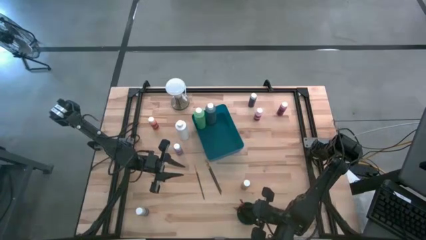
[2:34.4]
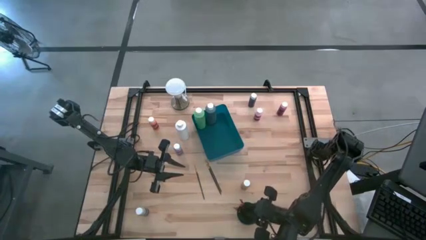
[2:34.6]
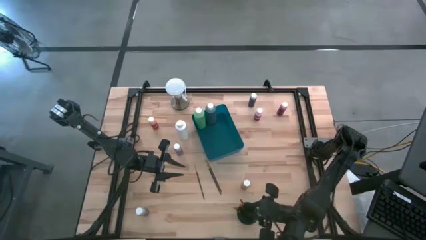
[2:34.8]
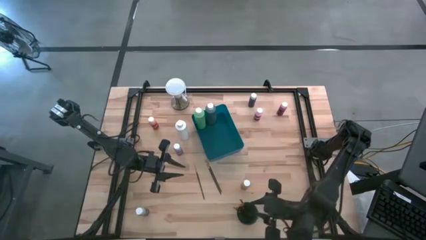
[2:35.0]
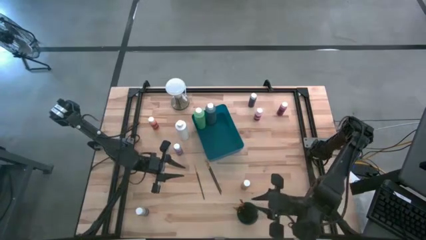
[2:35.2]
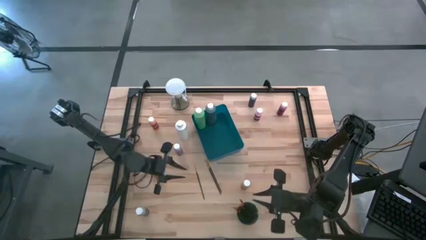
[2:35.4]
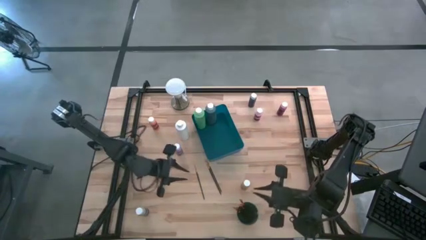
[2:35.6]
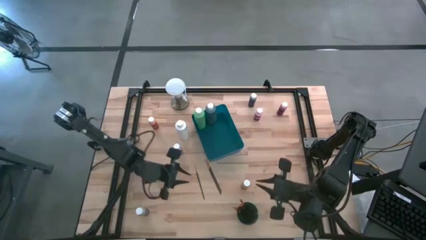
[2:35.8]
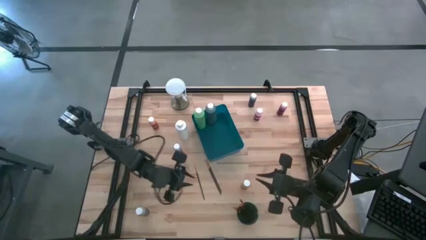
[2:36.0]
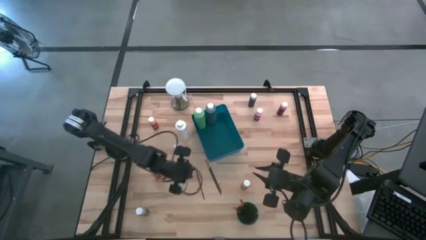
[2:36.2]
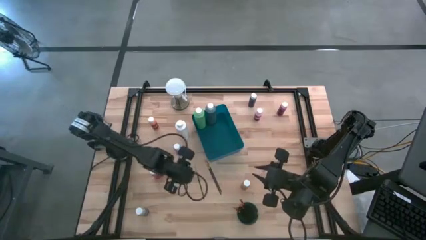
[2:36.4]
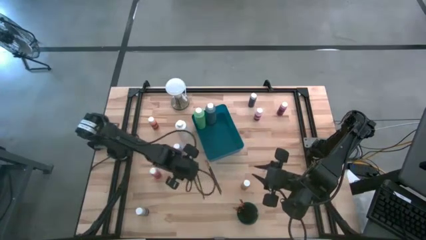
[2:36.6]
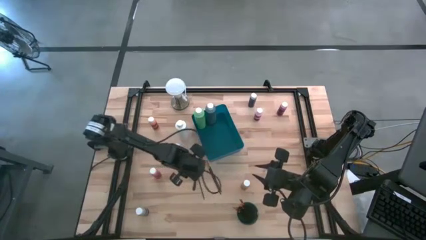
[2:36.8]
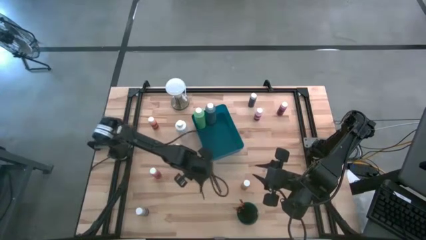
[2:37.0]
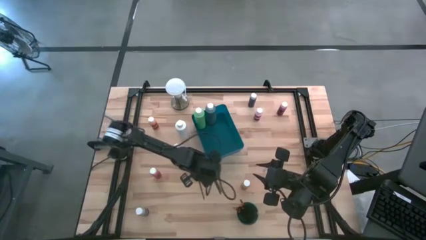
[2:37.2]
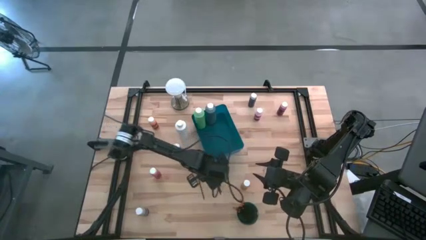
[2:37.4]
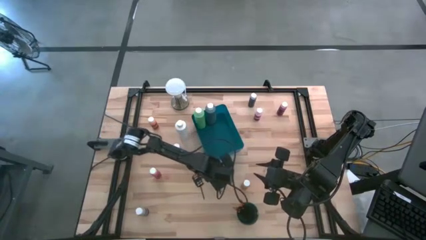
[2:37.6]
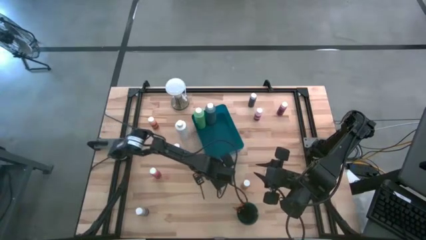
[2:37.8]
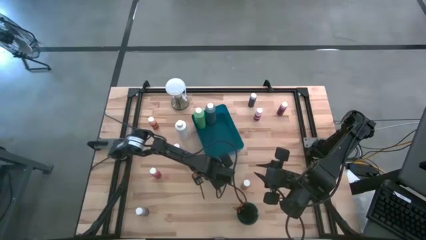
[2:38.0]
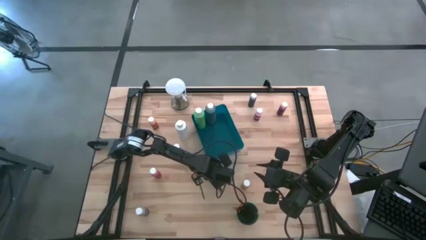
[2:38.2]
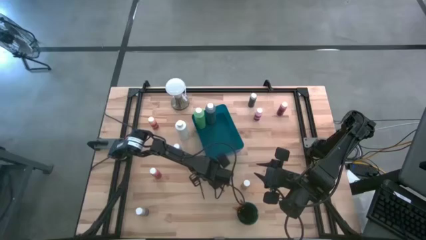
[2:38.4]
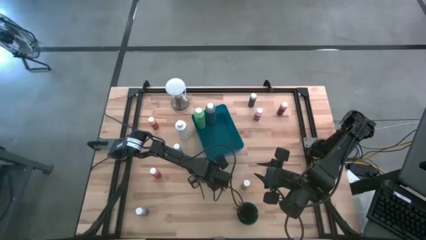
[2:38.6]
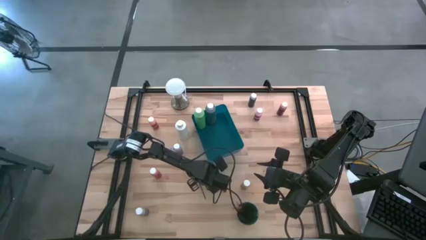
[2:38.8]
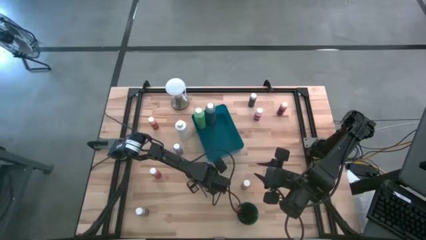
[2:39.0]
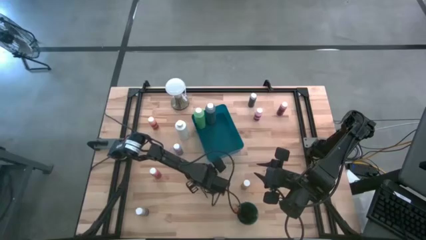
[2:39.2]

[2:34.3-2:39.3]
Task: Pick & Place Paint Supplies
Adjust the gold paintbrush

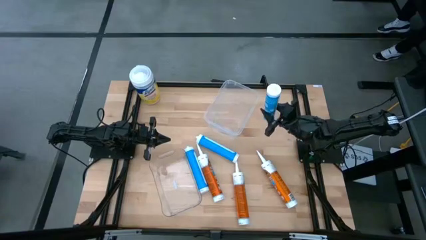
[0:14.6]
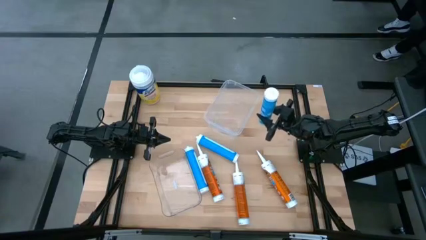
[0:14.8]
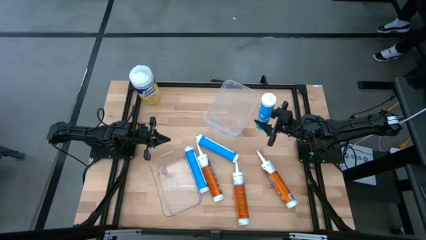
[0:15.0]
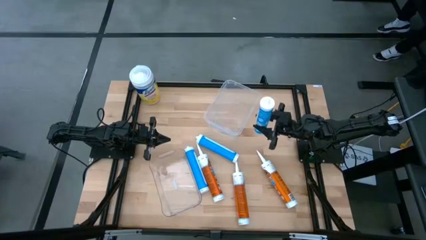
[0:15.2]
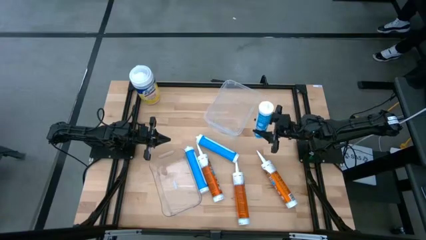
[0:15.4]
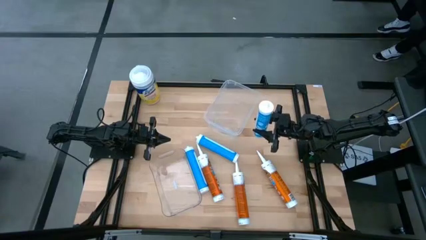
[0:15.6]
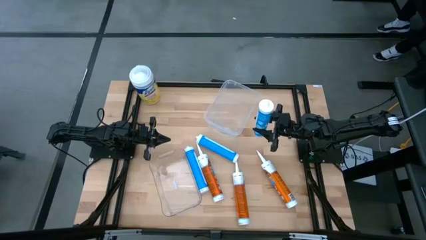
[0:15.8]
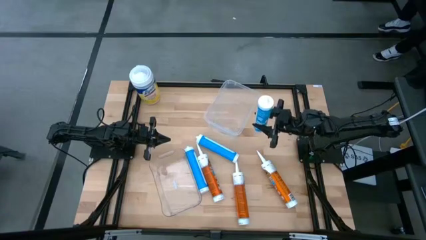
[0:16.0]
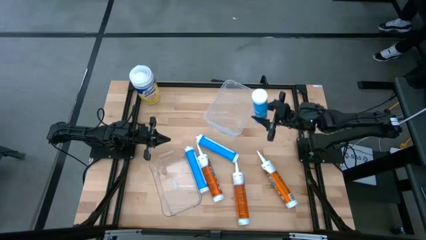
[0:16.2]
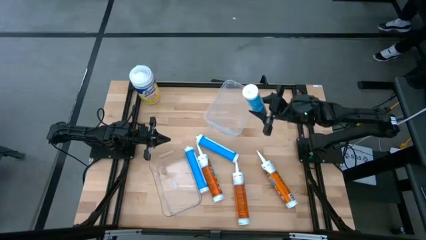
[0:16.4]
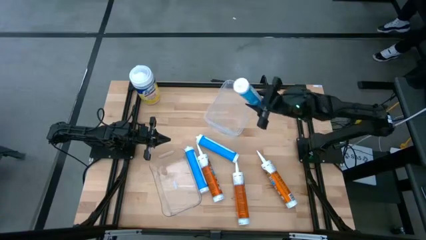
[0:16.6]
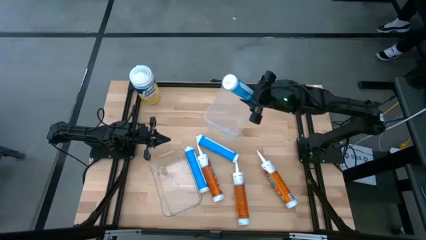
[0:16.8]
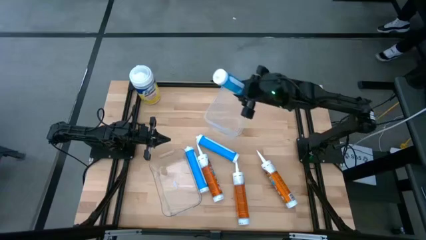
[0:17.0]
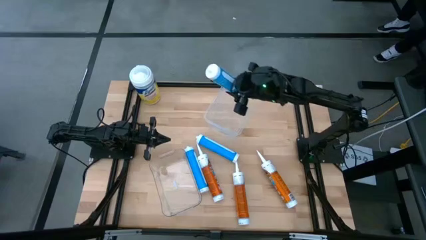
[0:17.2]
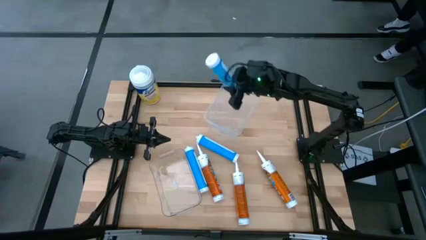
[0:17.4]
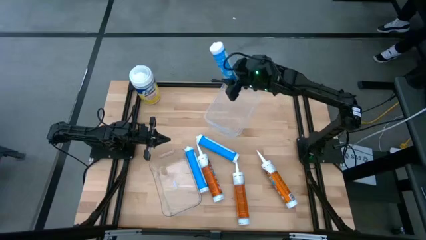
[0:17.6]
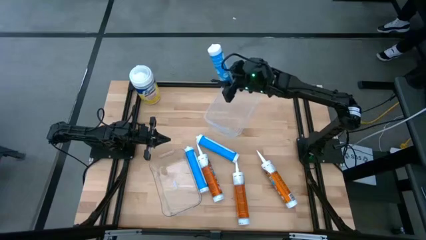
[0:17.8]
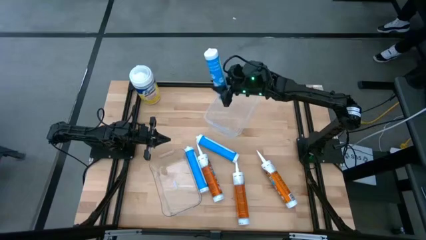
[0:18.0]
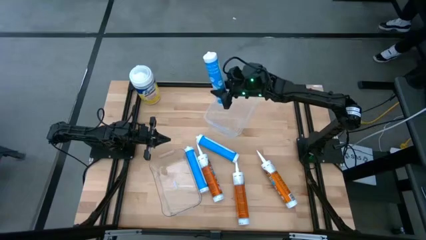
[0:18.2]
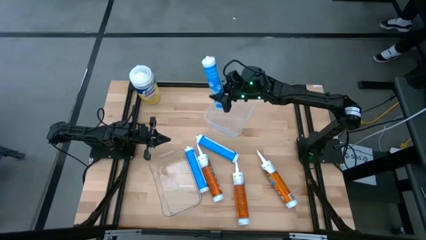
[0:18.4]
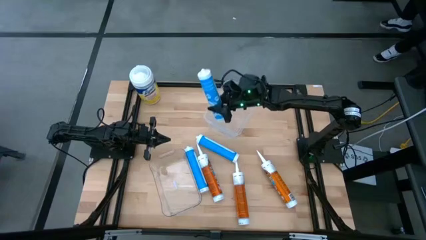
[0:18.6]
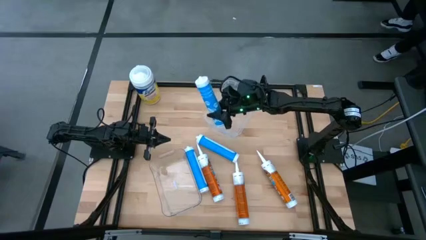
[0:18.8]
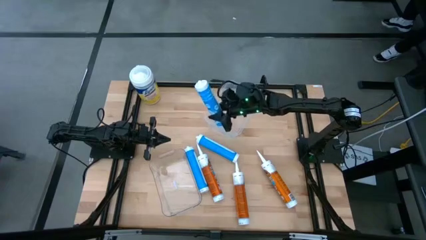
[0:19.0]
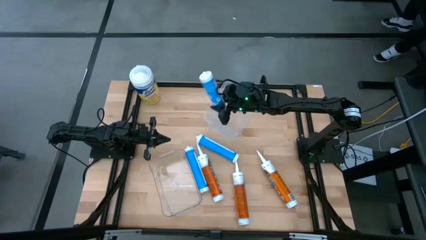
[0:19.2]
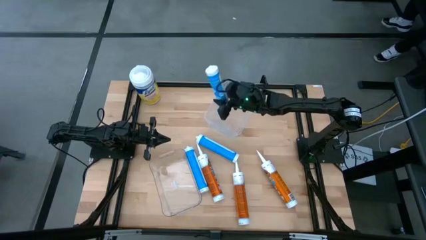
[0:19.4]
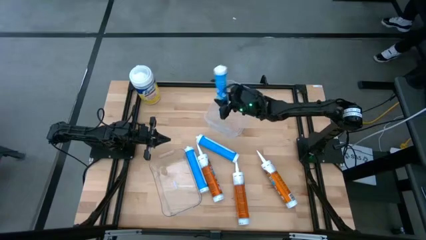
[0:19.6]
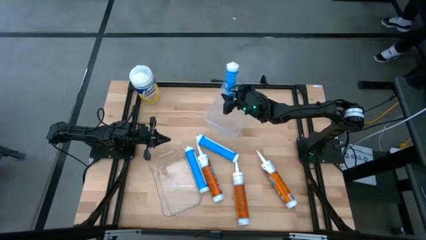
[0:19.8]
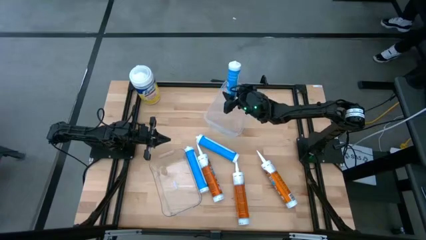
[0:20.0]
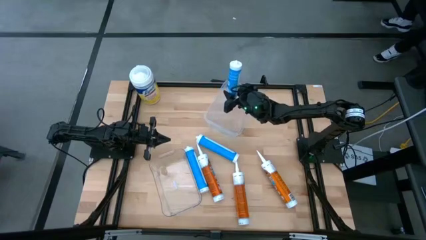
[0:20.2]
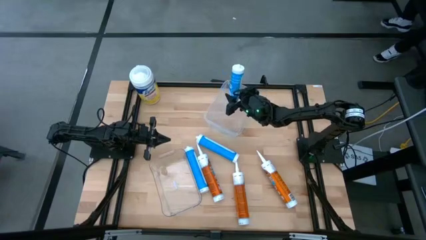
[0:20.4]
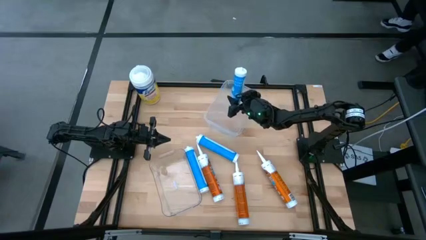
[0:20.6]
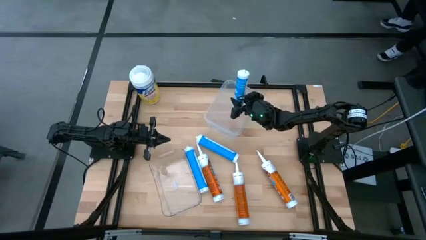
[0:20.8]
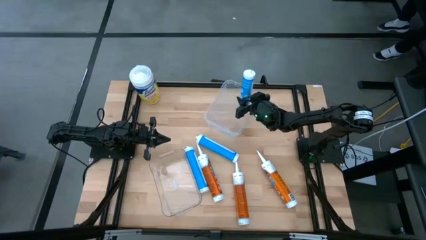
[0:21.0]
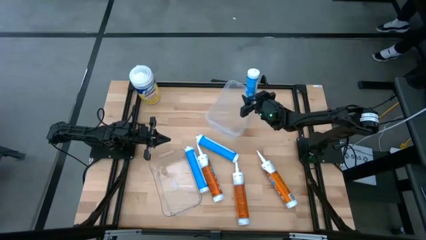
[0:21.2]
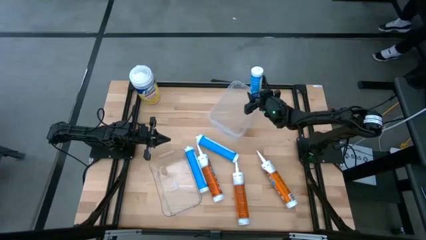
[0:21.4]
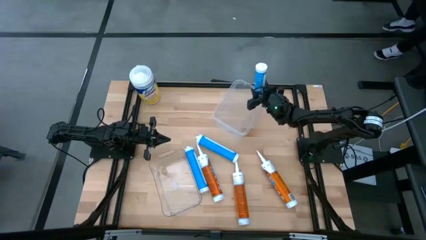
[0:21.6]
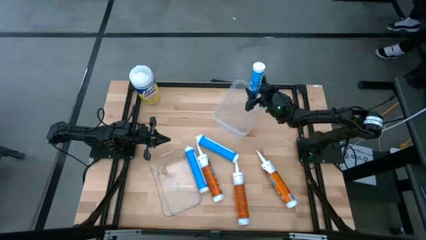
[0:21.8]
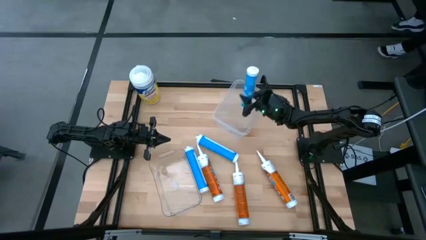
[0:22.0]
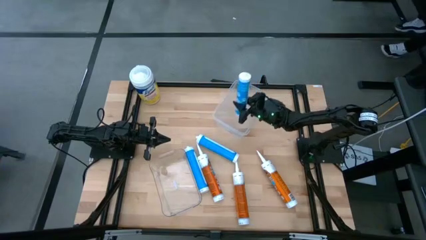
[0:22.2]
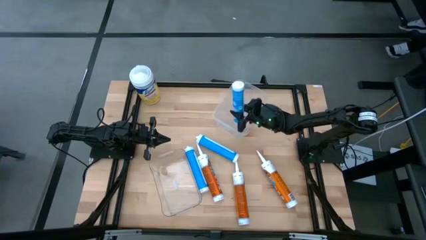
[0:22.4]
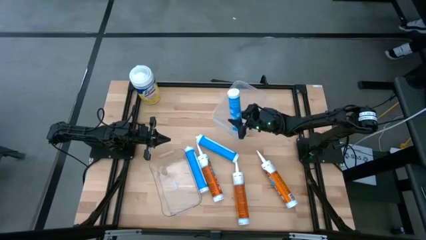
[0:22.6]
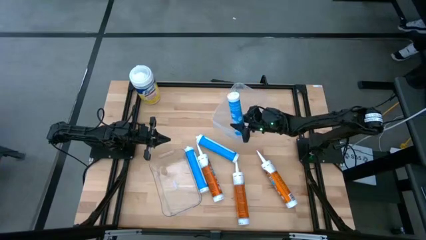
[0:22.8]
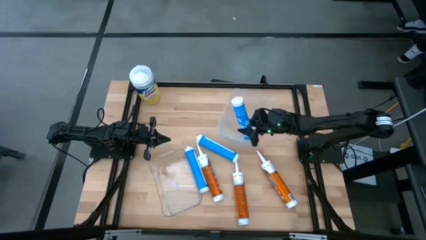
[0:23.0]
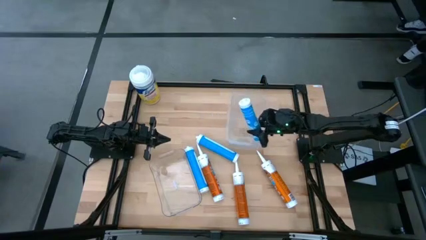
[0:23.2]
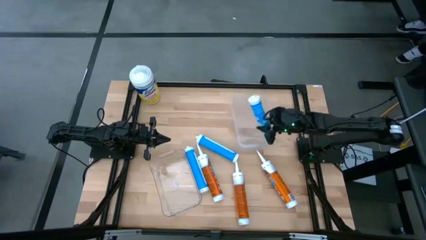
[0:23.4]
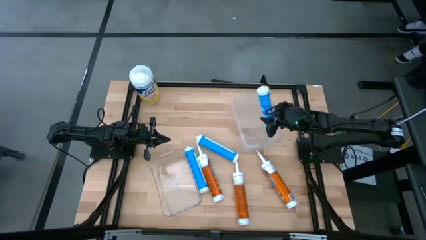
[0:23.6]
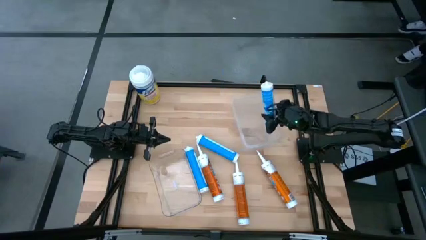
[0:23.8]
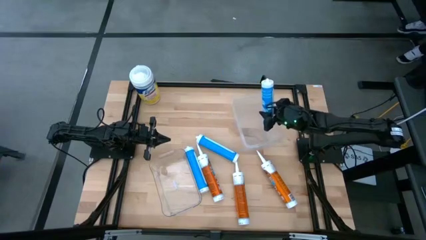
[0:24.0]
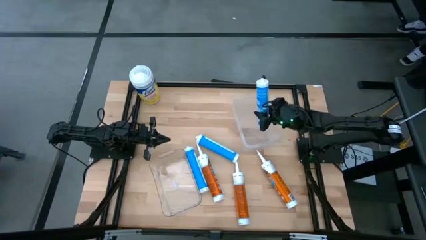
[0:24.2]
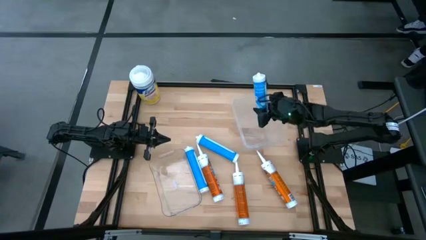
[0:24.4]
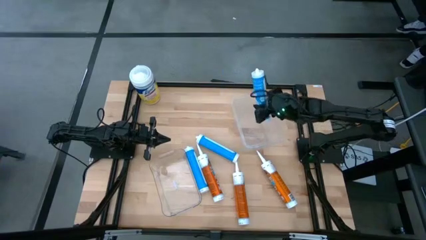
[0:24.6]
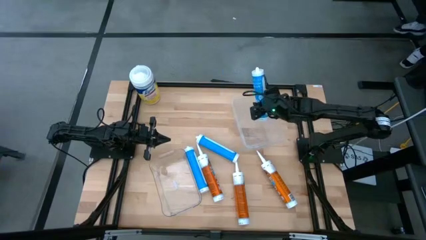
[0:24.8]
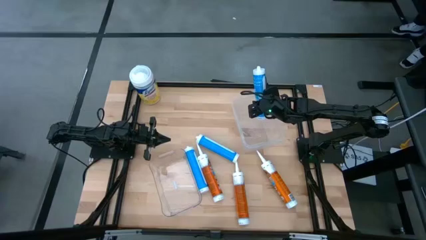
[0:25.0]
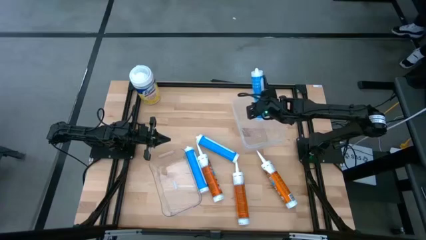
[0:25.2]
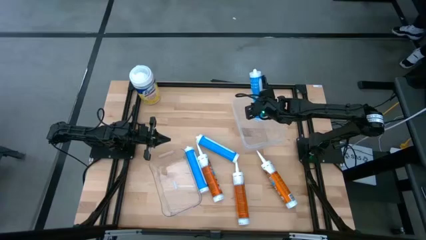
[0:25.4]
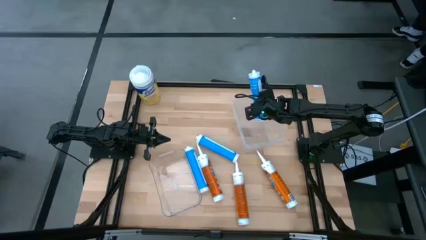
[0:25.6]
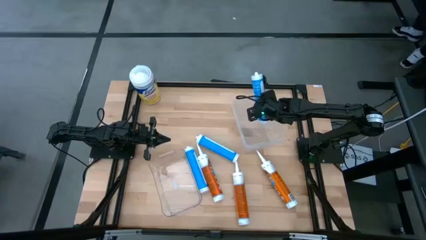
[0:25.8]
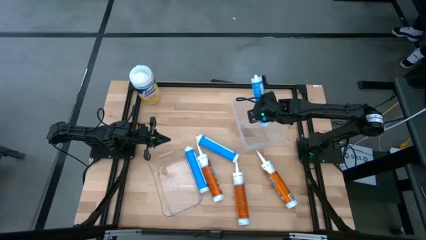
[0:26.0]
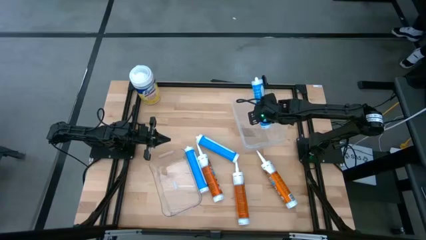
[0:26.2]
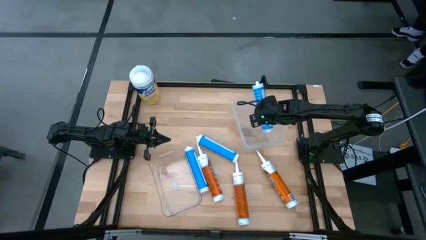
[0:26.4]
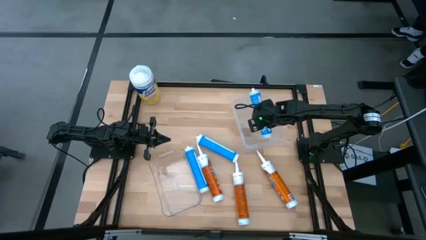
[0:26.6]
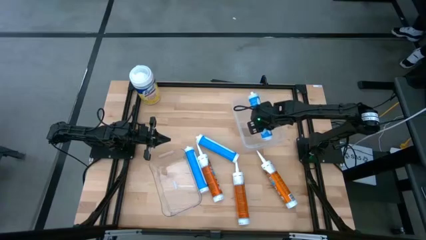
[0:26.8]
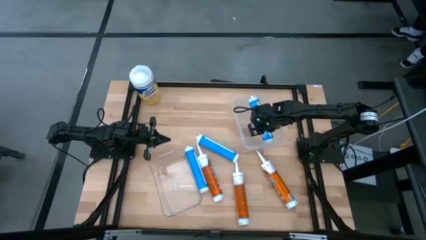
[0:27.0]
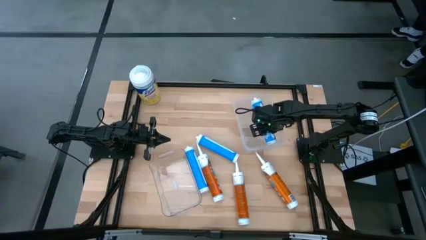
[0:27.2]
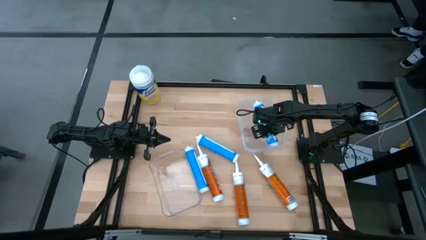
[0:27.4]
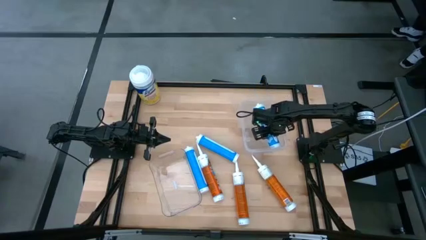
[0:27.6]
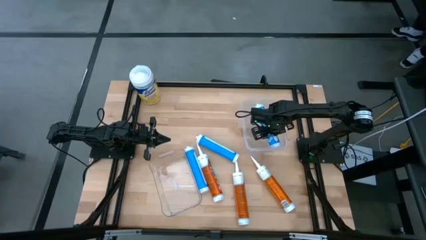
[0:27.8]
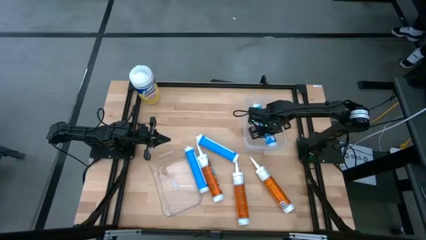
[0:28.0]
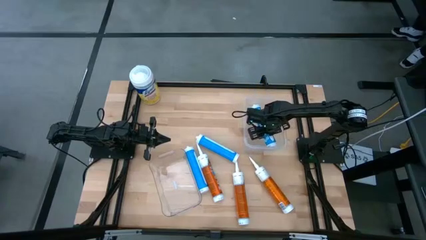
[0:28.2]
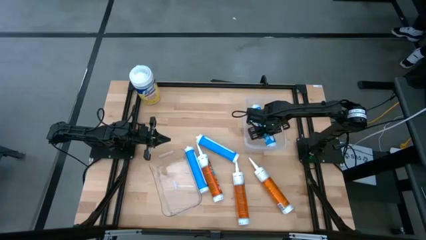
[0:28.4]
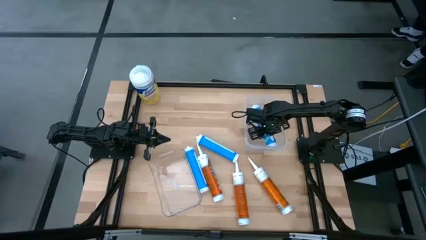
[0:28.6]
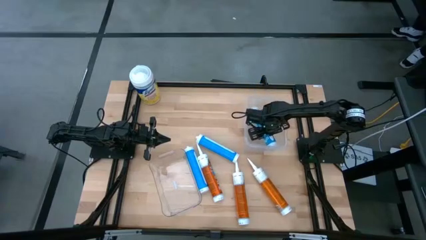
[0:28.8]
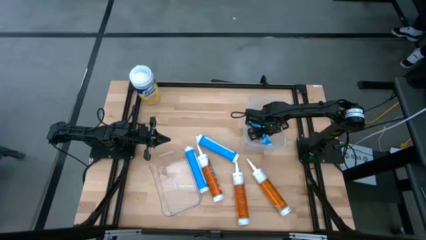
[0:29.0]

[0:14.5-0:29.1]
Task: Pick & place silicon tubes, Sealant and Lysol wipes
Put the top right blue sealant into the white bin
